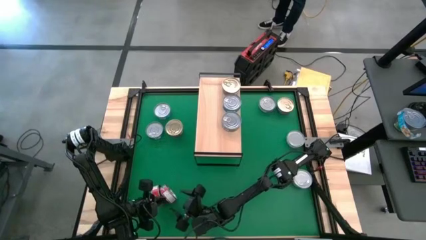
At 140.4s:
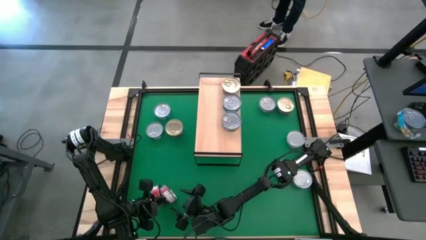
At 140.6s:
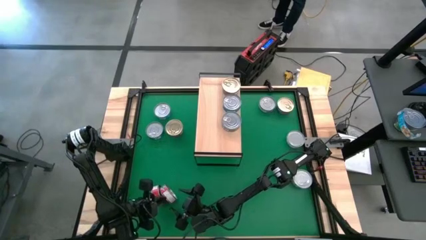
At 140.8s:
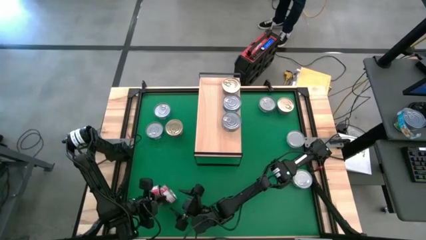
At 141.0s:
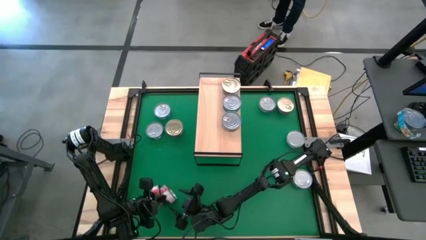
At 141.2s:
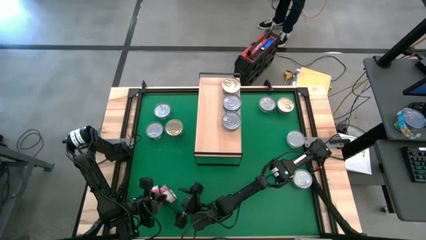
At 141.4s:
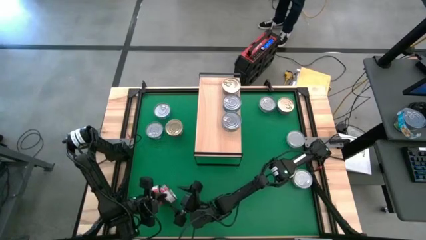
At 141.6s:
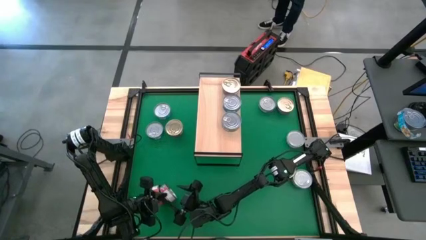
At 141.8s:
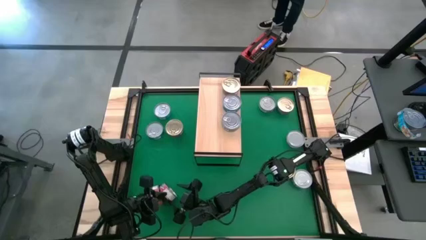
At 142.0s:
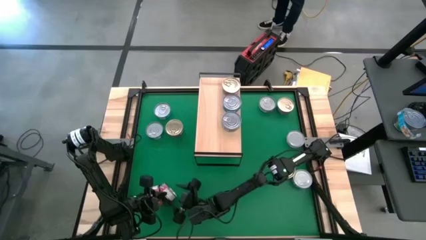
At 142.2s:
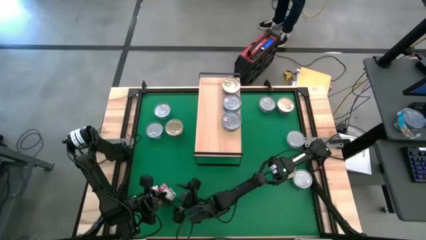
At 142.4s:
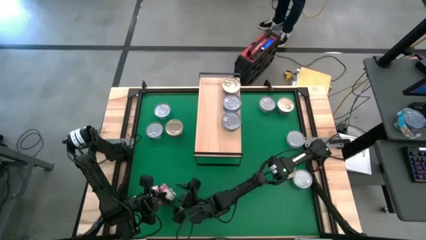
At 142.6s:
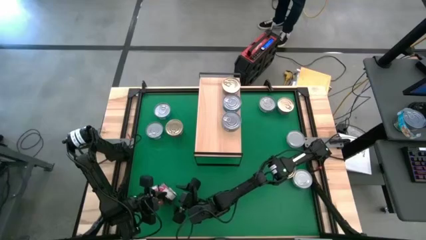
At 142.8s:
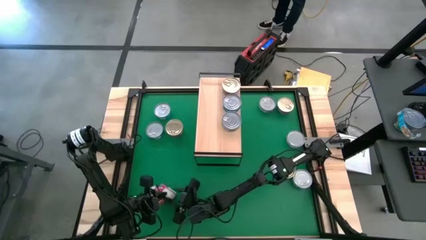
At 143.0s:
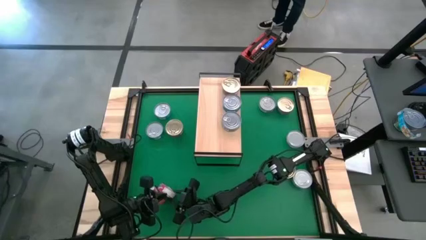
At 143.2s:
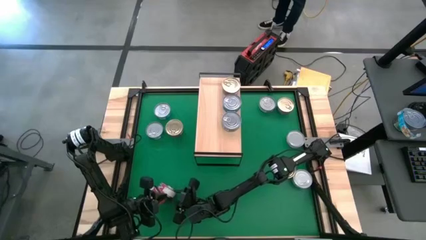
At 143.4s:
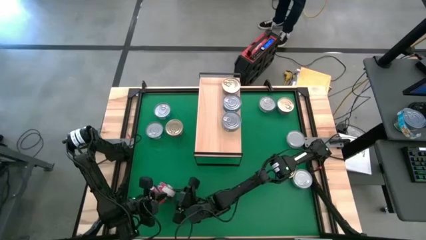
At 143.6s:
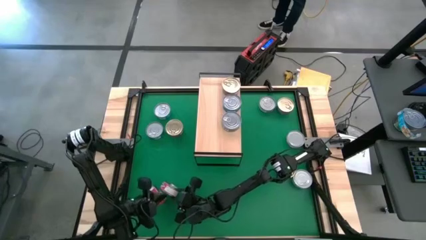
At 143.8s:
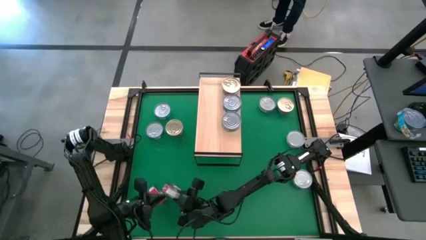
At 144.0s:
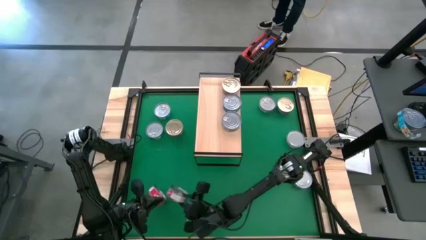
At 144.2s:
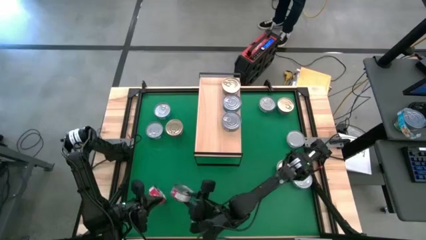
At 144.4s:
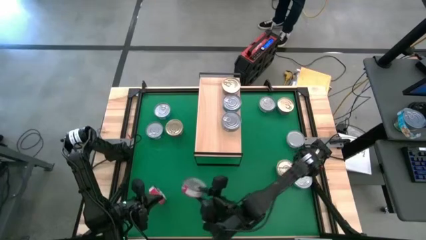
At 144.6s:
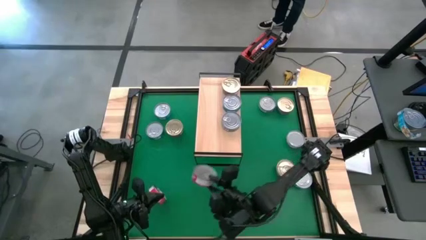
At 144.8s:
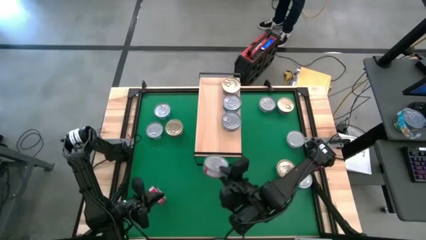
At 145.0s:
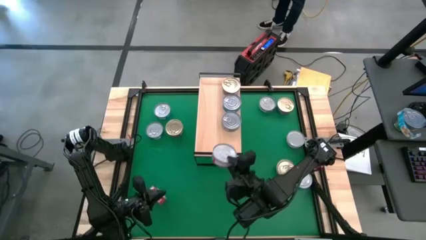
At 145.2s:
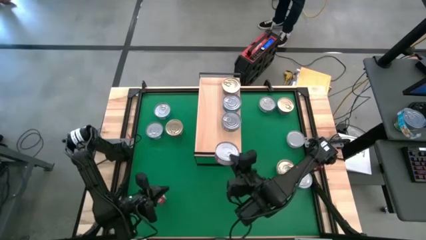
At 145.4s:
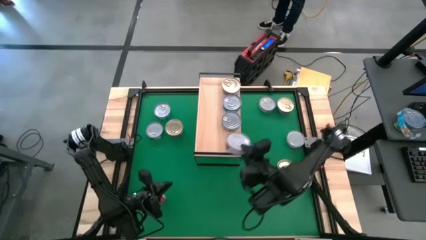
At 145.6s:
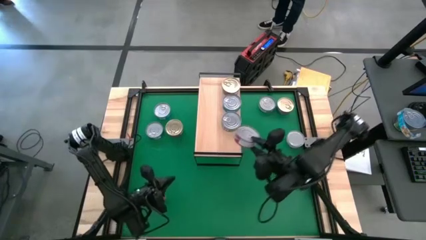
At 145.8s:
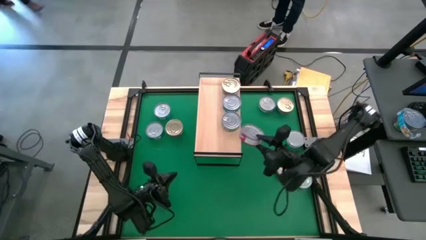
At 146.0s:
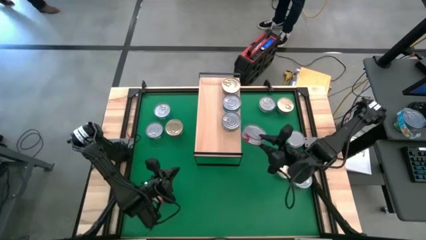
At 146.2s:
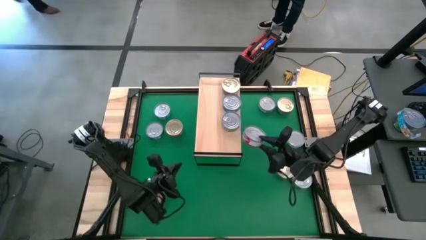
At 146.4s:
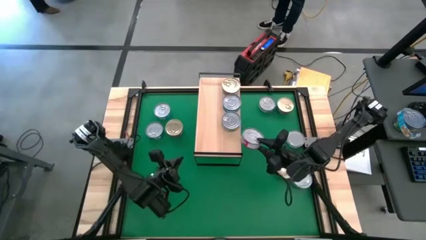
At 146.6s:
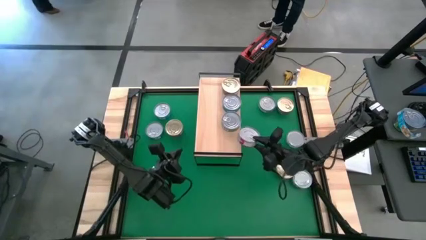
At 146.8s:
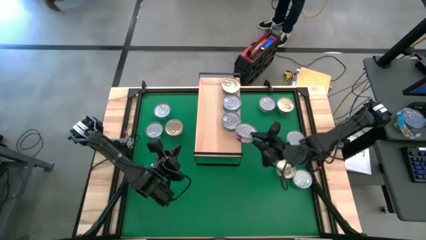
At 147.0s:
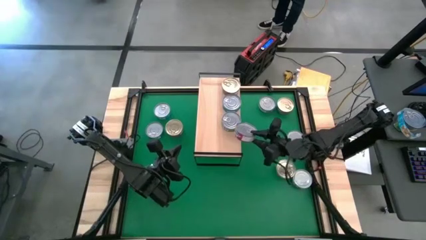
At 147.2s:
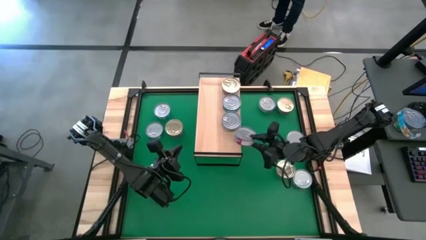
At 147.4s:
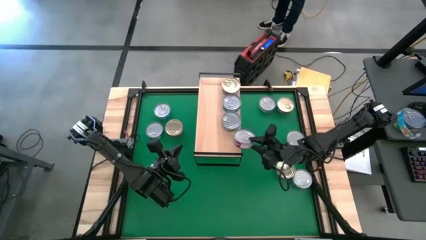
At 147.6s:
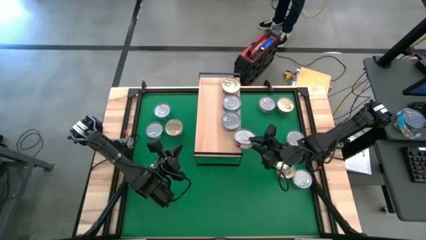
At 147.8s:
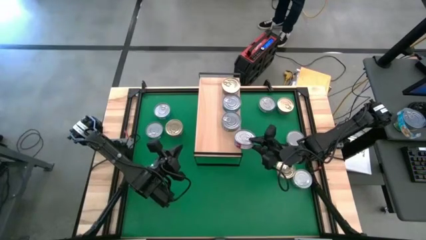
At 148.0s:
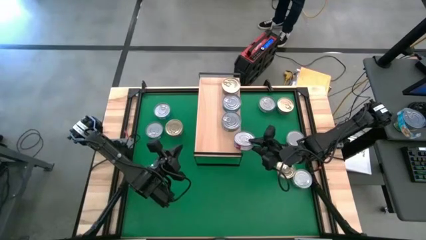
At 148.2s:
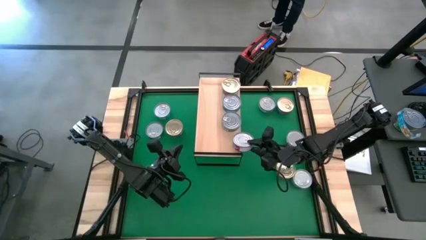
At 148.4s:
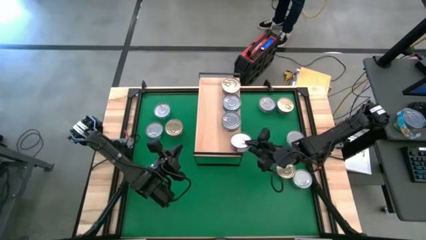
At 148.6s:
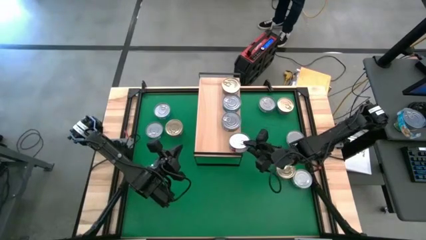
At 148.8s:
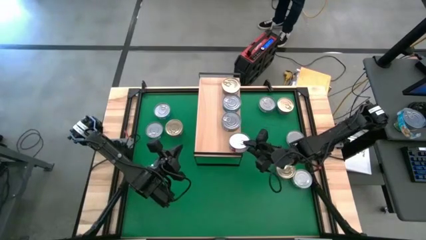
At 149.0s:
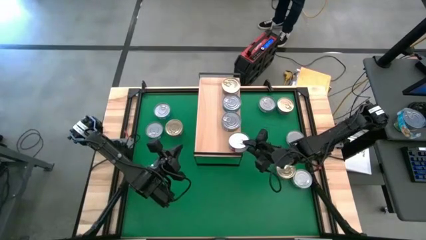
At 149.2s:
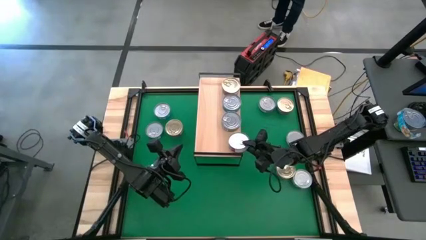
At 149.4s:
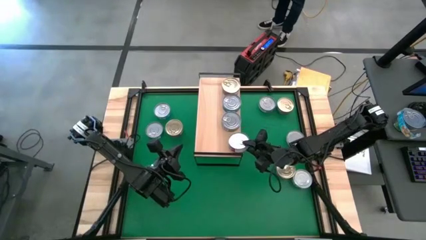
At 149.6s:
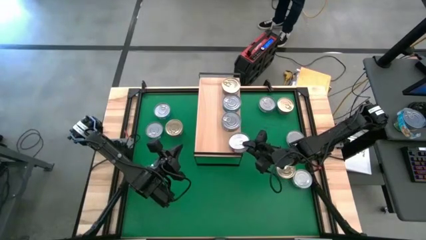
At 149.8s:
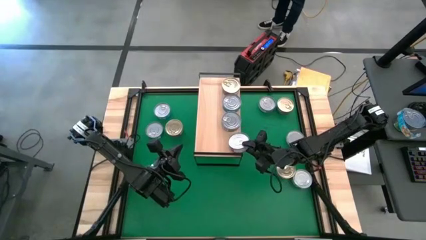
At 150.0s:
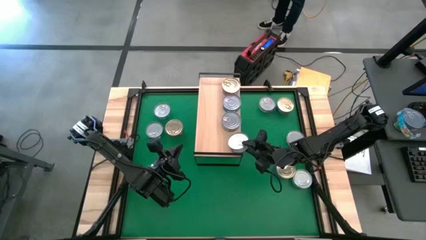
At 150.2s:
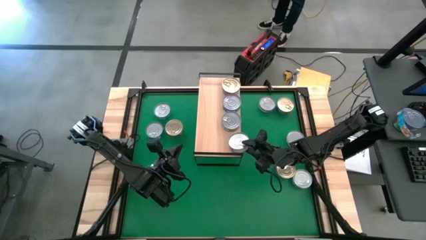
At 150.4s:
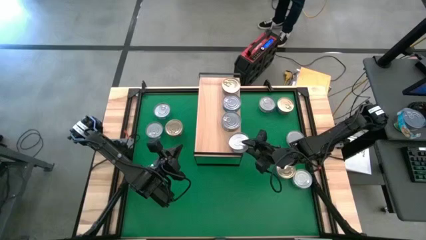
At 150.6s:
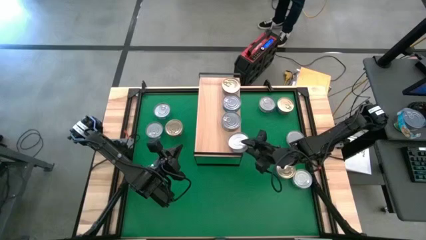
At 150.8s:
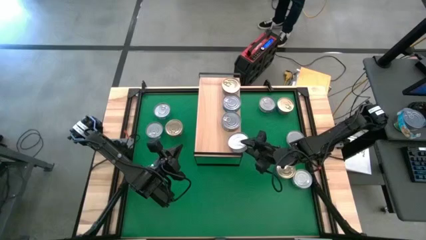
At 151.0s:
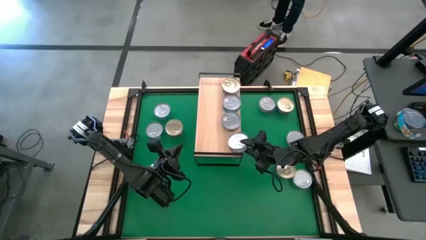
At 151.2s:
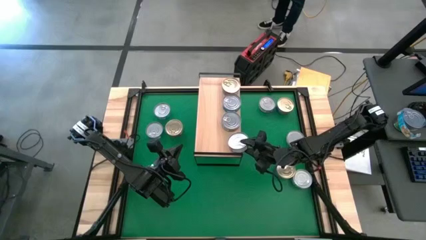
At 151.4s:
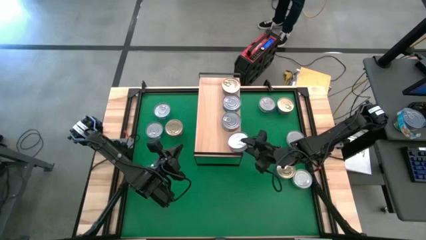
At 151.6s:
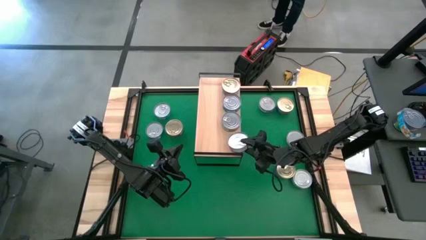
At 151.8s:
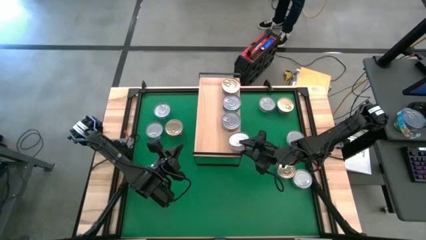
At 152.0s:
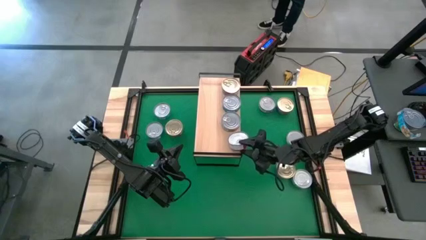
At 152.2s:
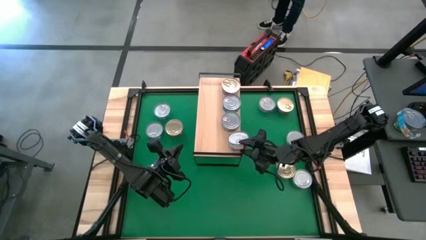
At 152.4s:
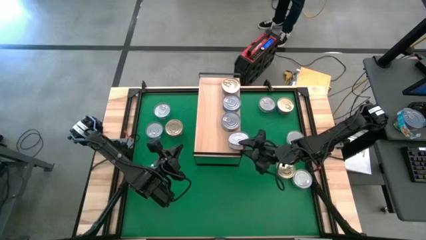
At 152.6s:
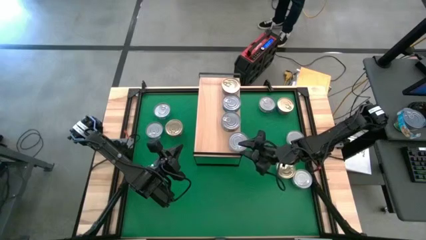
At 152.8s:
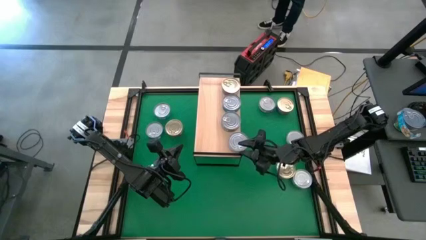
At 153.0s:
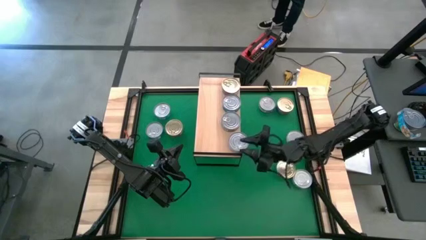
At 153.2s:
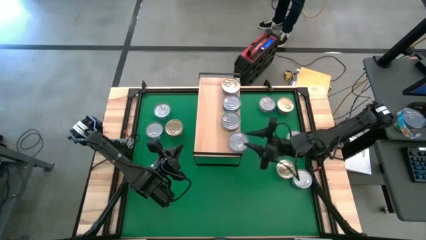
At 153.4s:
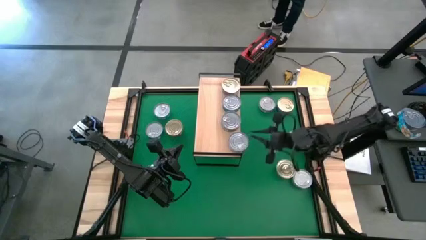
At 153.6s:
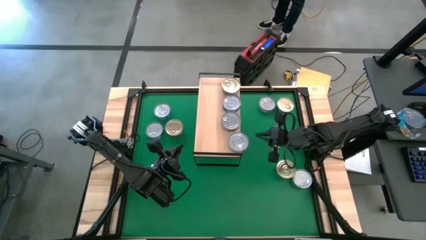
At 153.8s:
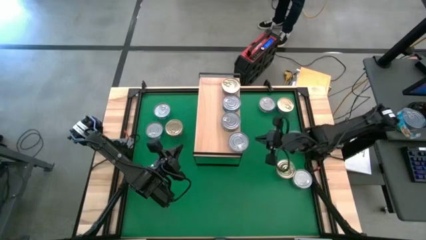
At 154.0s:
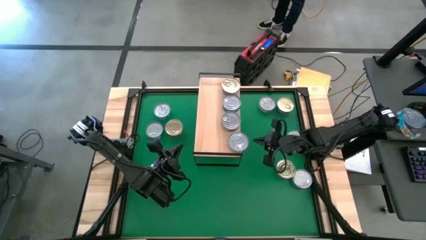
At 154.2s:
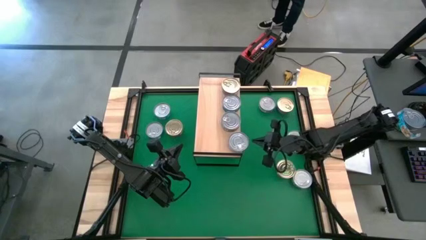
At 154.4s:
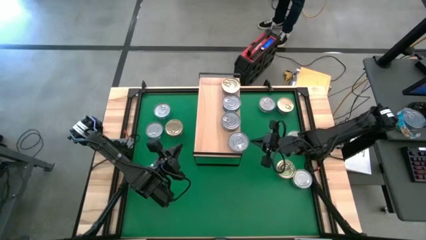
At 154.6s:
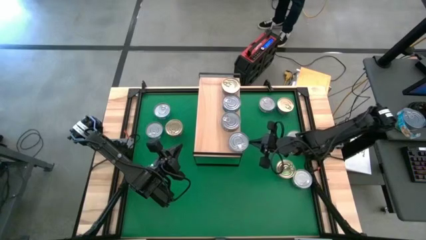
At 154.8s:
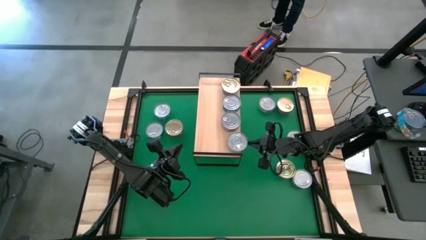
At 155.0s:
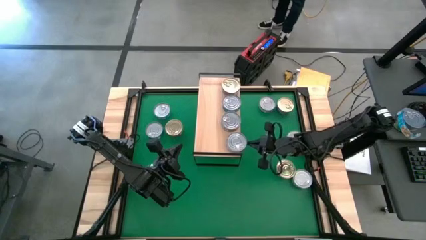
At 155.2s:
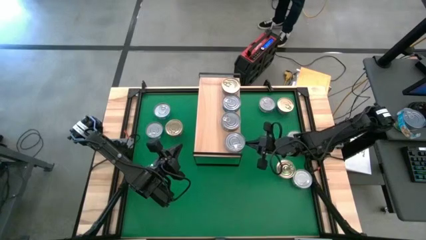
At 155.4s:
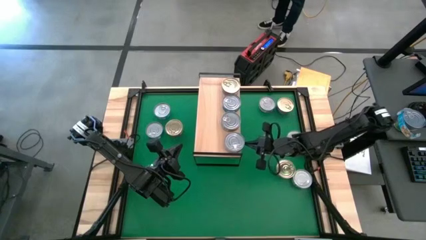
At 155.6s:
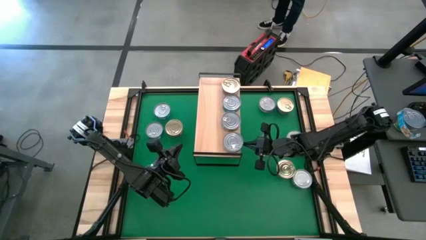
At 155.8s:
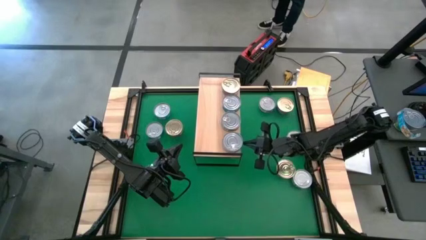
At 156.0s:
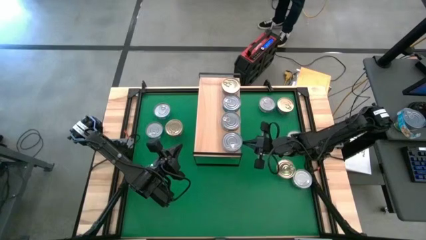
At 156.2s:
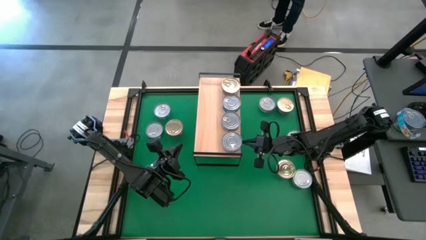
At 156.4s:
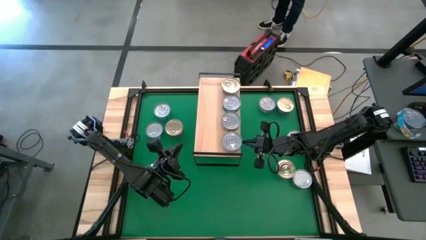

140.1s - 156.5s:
Task: Stack canned seafood by type on shelf
Put the right red tuna can on the shelf
